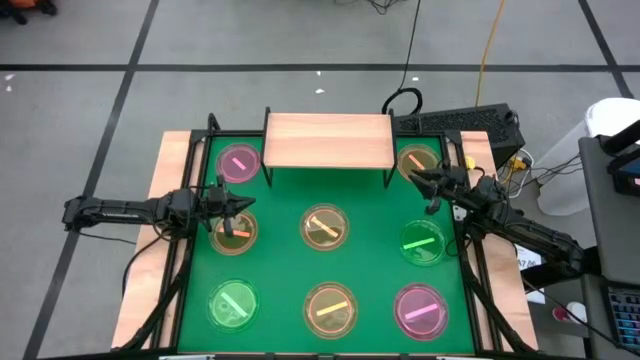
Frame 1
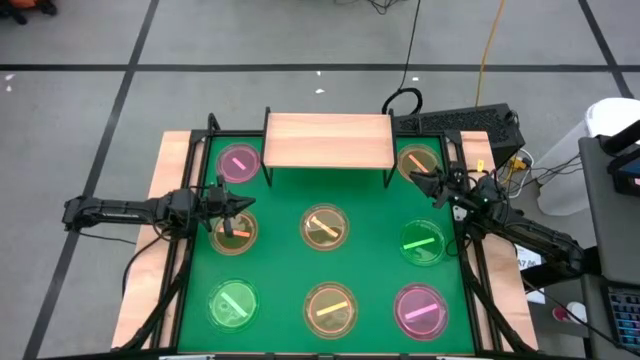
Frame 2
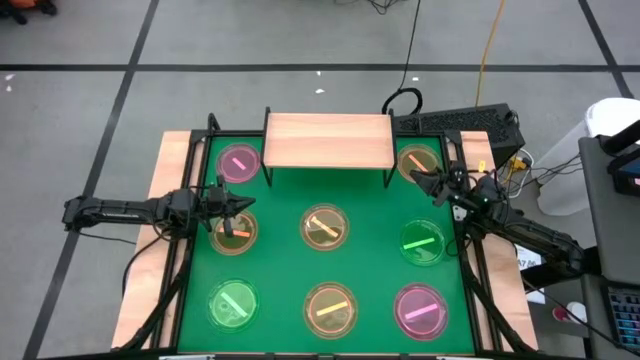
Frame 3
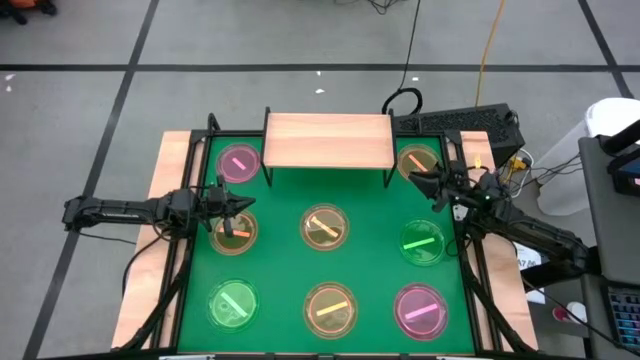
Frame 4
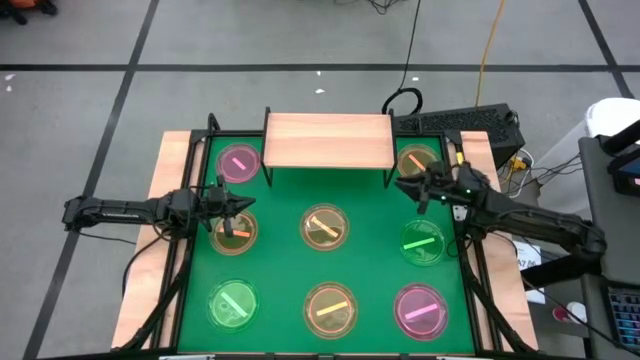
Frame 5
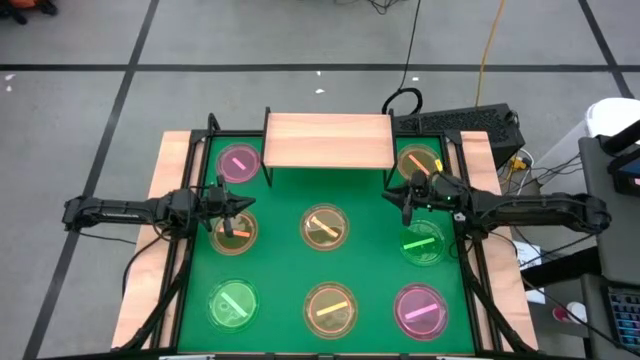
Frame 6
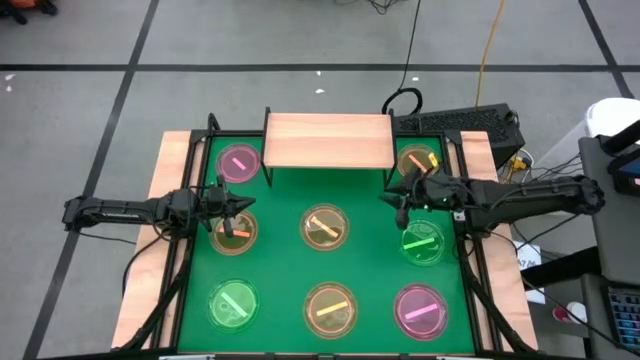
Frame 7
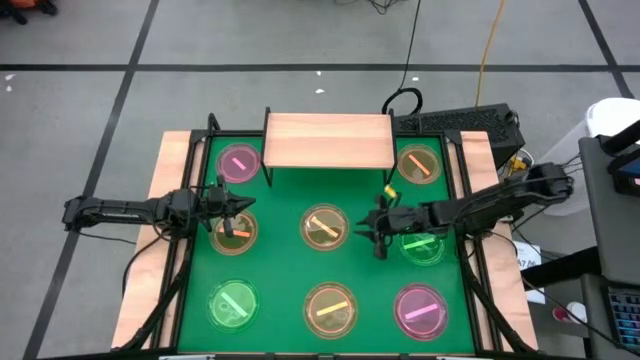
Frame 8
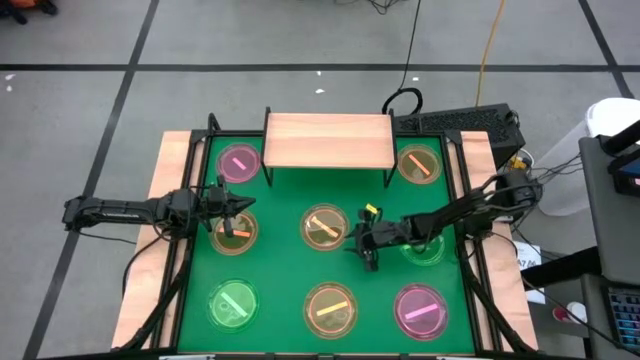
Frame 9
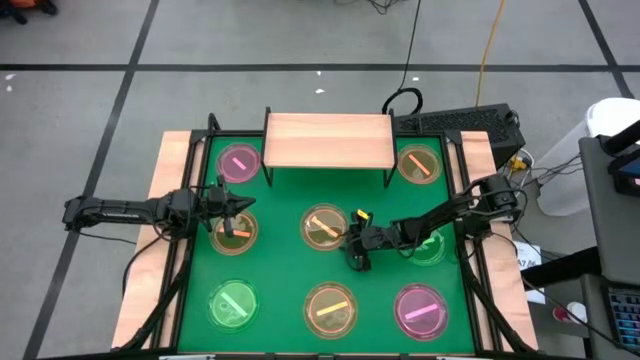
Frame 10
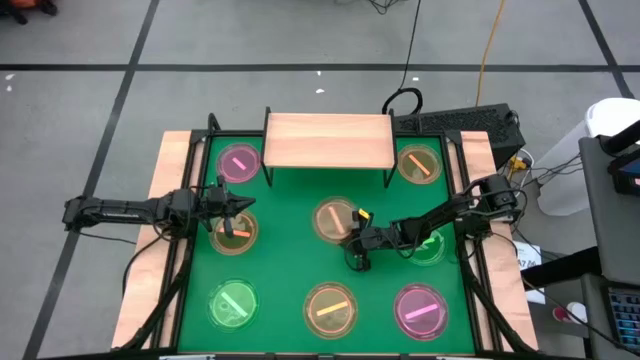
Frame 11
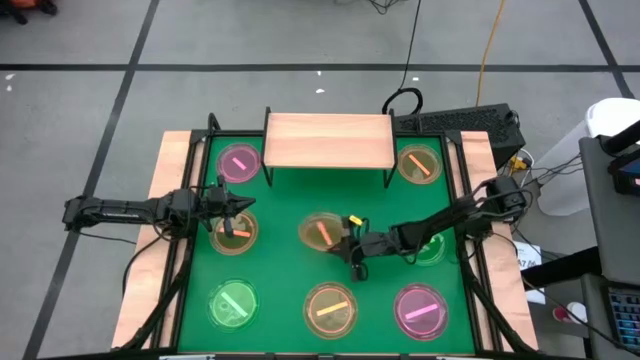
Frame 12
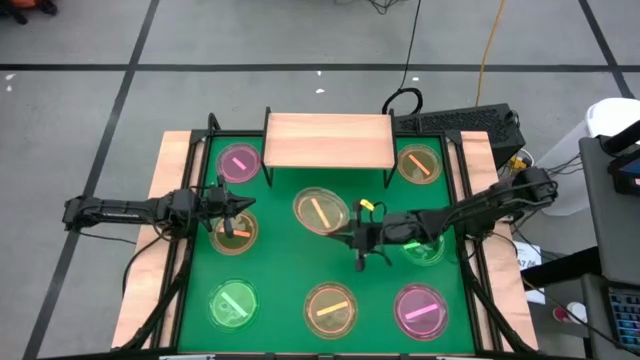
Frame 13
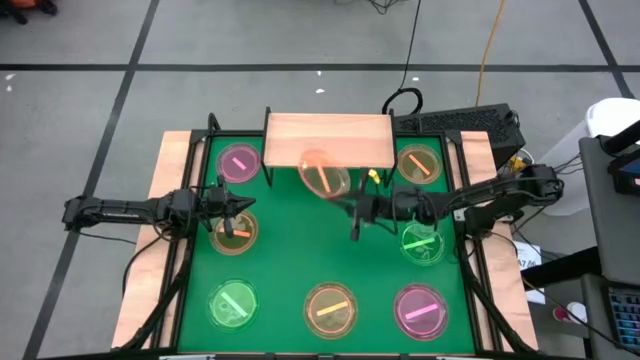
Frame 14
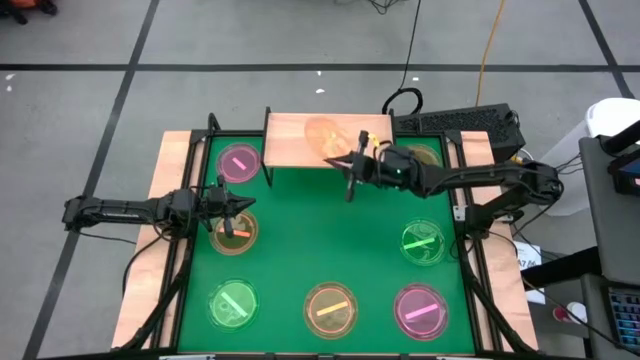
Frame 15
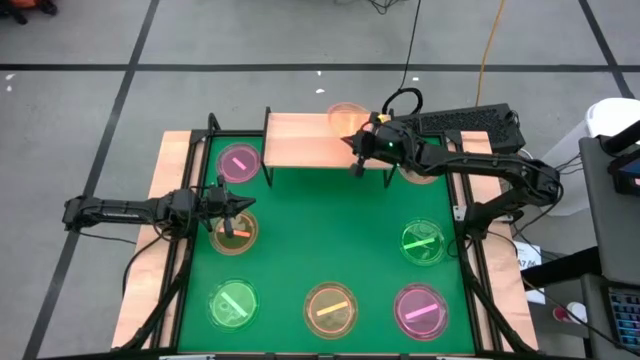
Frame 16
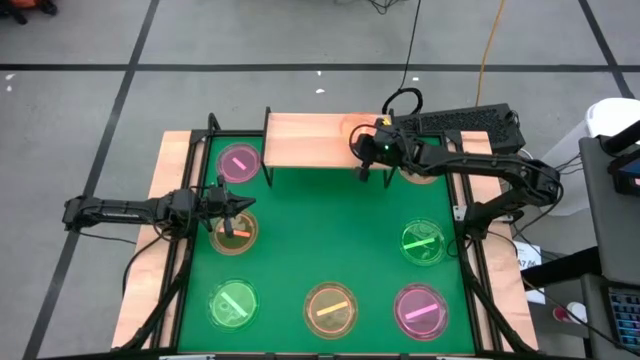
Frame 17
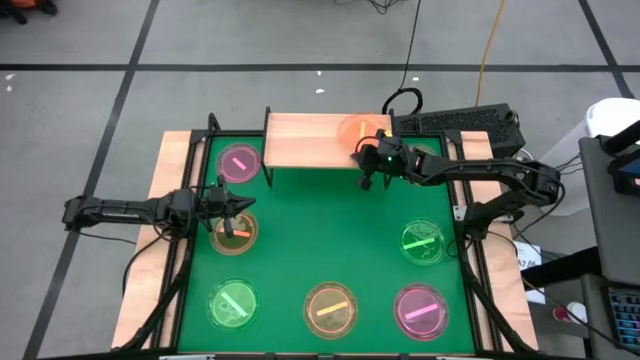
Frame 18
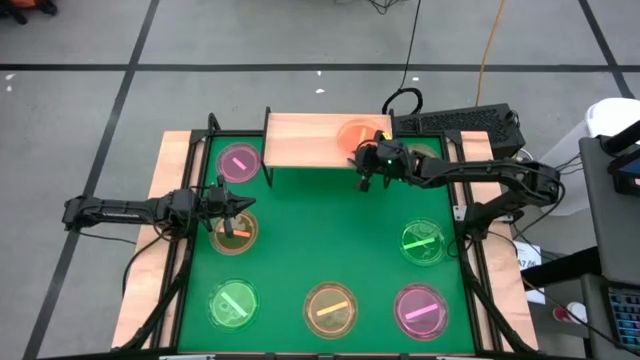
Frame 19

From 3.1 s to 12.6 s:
Task: Place and stack plates onto a shelf
Put the orange plate on the shelf

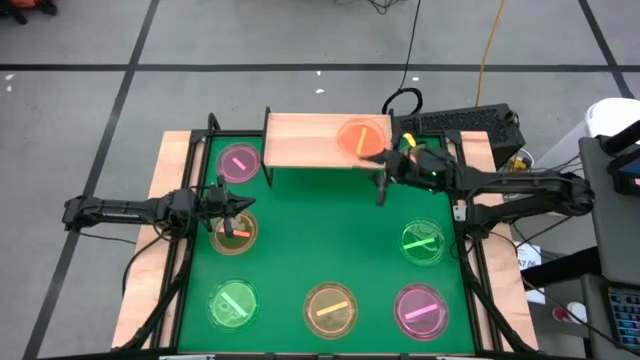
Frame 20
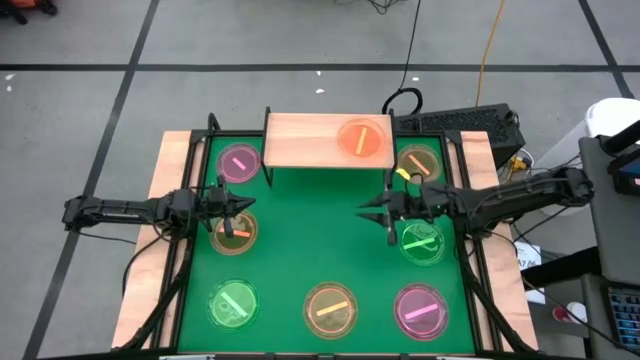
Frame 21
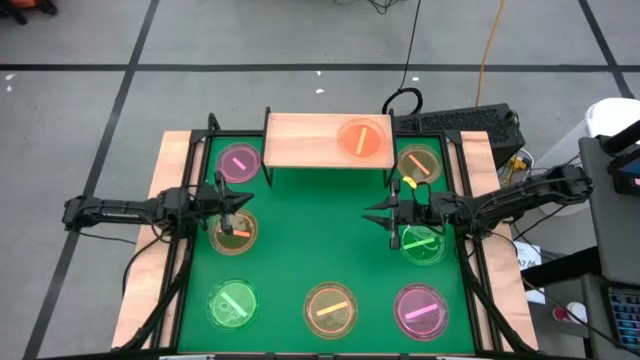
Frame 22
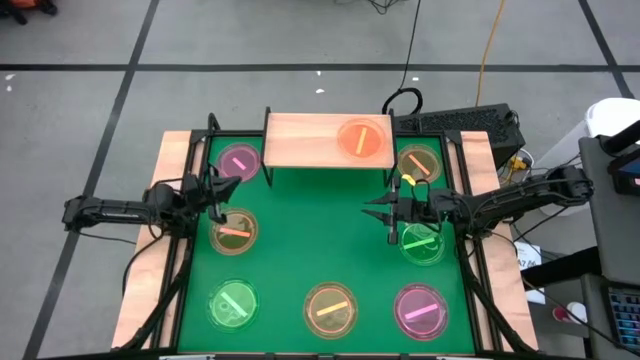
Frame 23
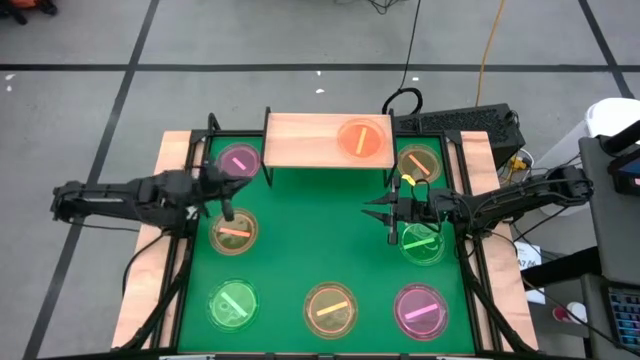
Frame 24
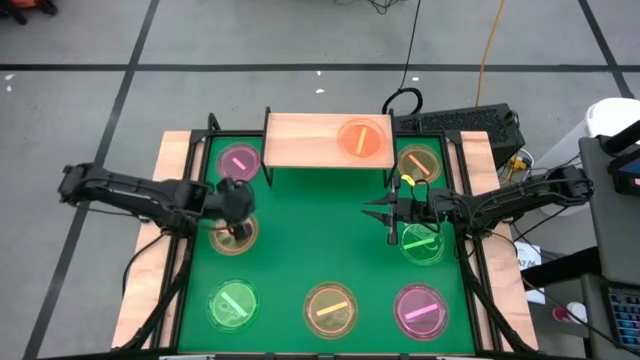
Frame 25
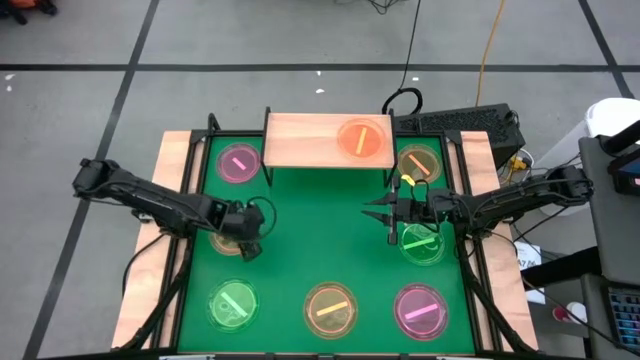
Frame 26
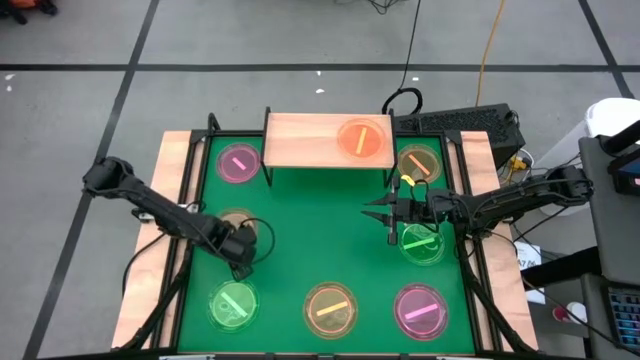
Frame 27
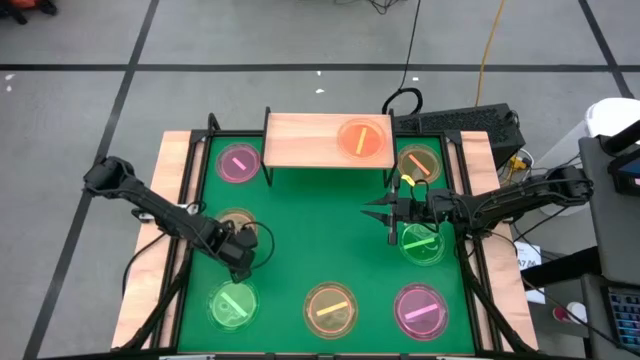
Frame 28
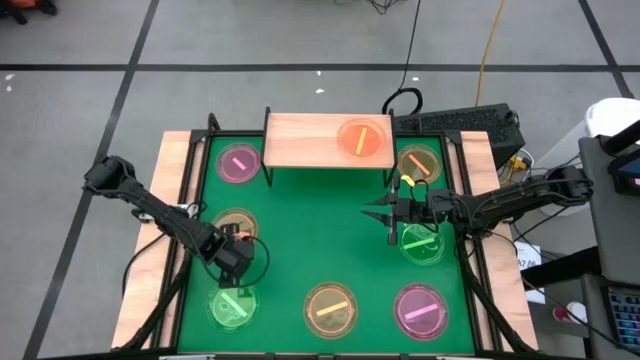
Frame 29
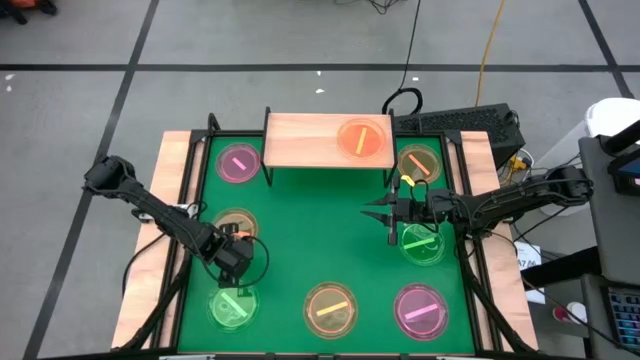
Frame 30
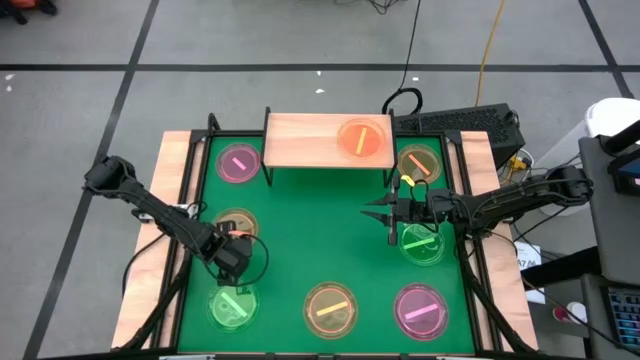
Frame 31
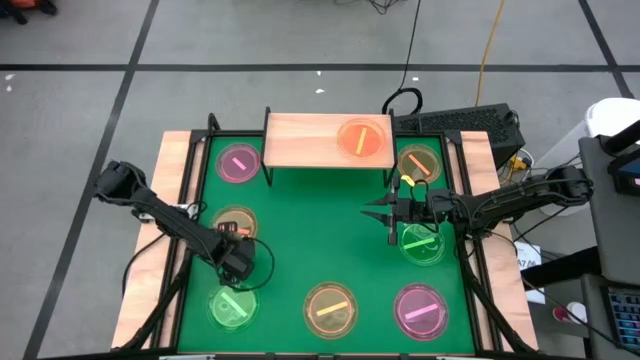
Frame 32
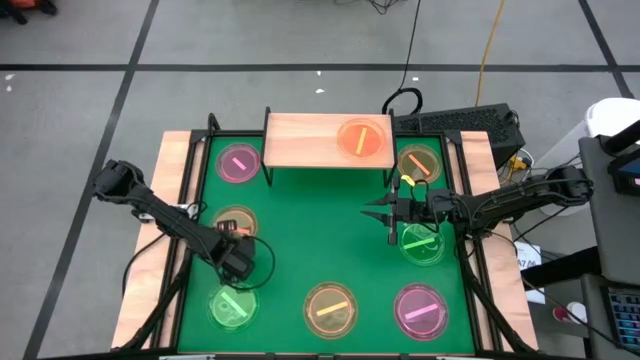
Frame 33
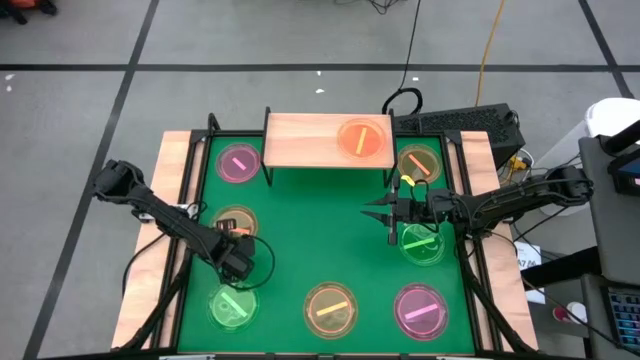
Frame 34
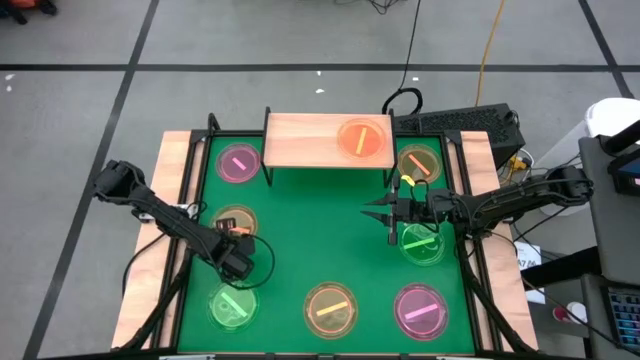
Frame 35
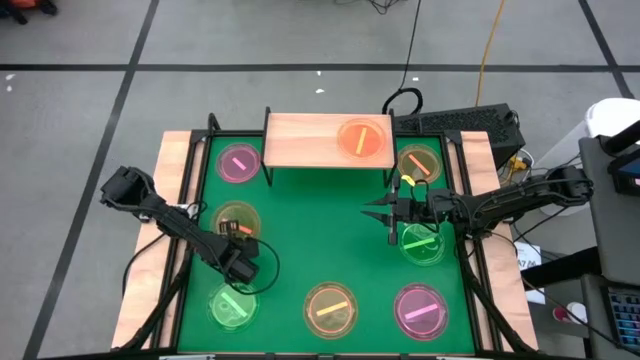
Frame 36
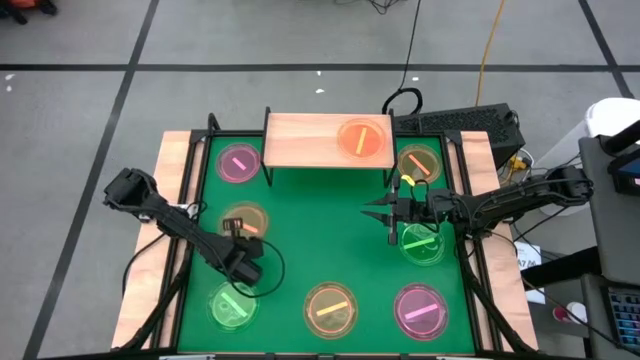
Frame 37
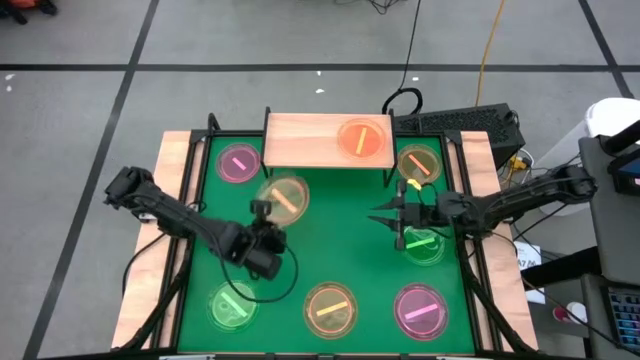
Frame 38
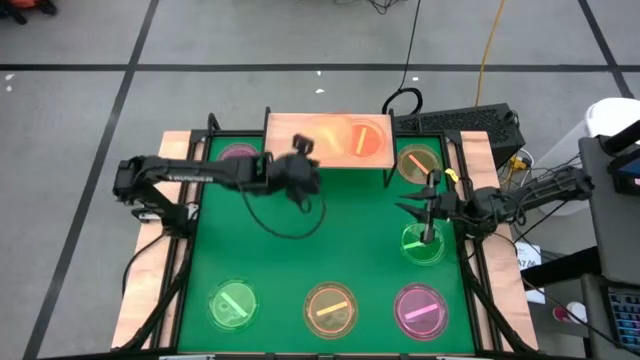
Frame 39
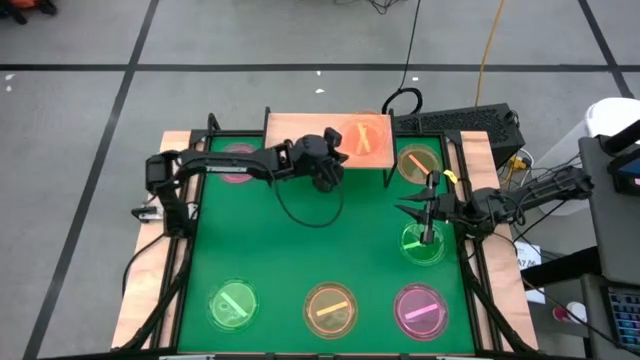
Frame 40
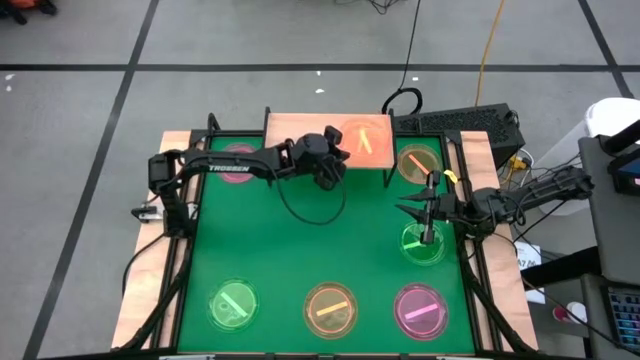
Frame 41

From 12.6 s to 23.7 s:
Stack the orange plate on top of the orange plate on the shelf

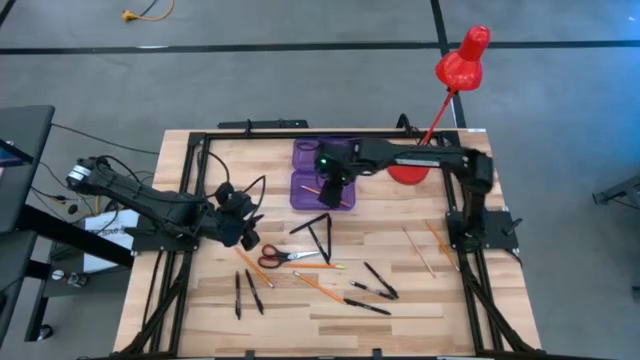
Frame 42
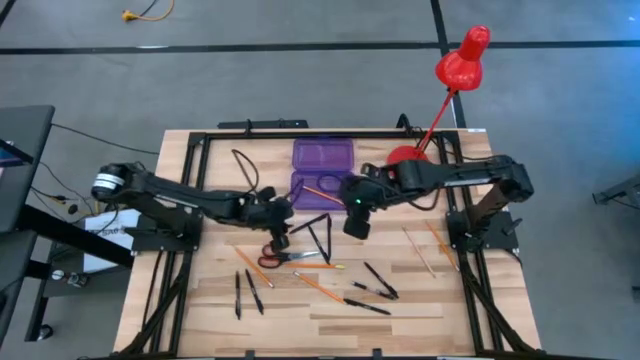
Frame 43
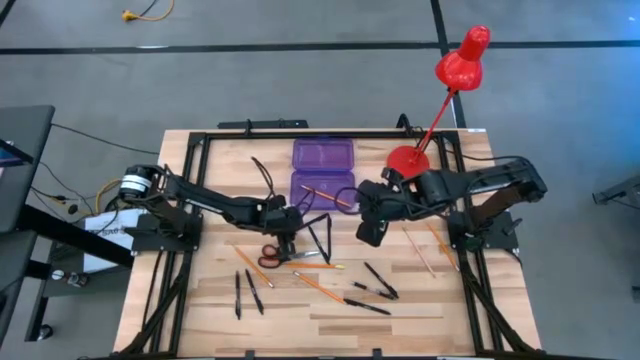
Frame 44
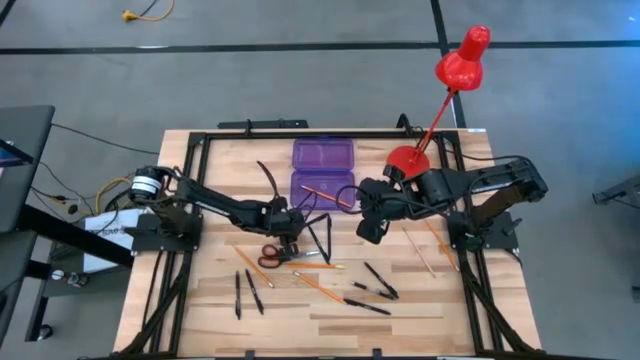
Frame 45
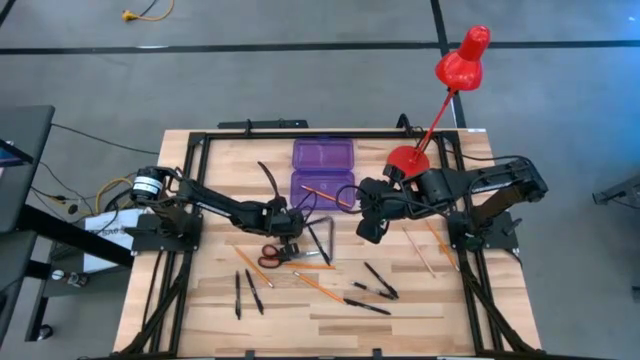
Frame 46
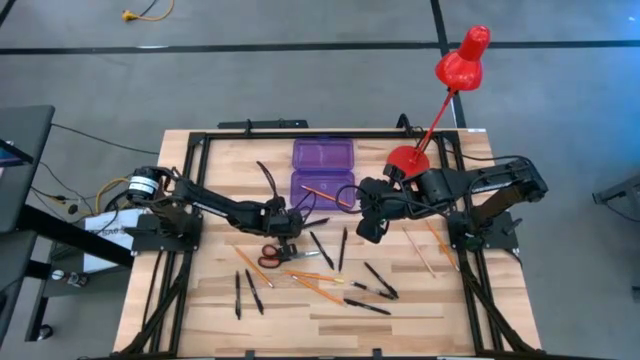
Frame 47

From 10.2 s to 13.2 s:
Task: Pick & place school supplies into a supply box
Put the black pen into the purple supply box
